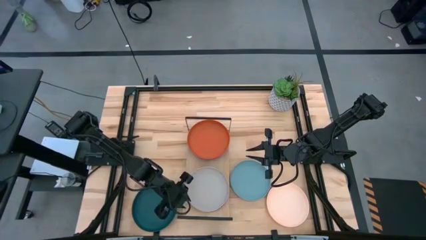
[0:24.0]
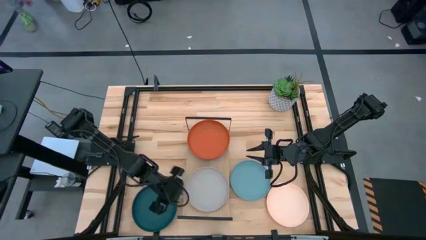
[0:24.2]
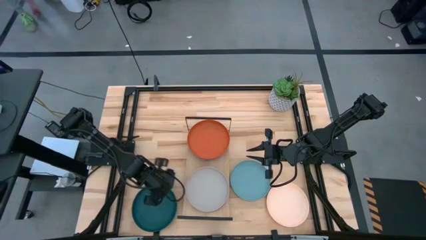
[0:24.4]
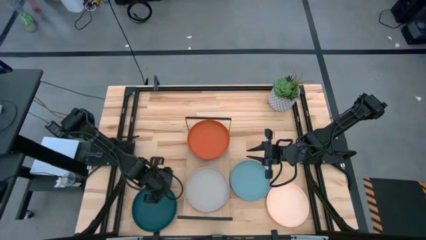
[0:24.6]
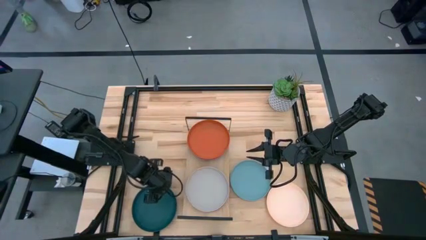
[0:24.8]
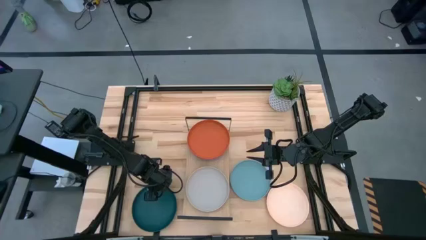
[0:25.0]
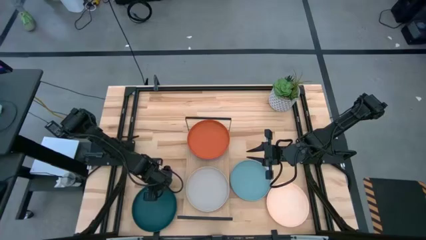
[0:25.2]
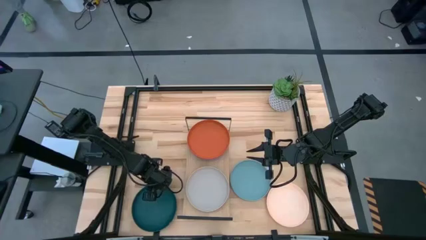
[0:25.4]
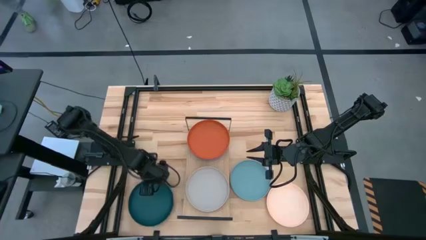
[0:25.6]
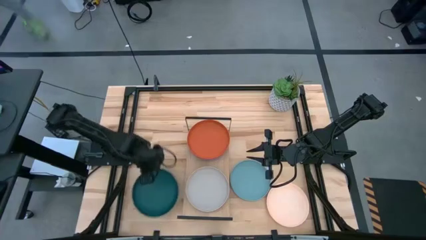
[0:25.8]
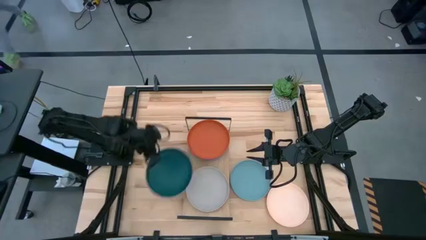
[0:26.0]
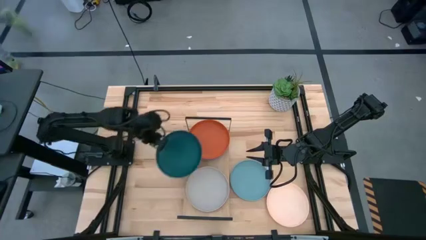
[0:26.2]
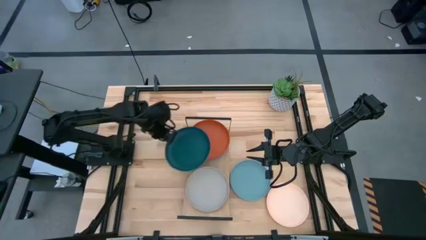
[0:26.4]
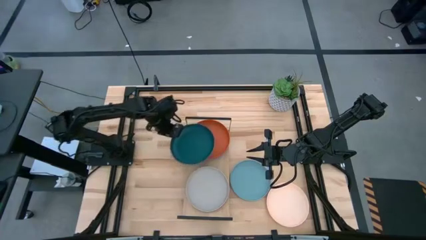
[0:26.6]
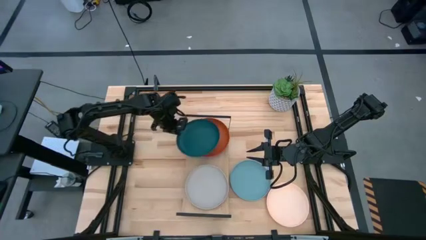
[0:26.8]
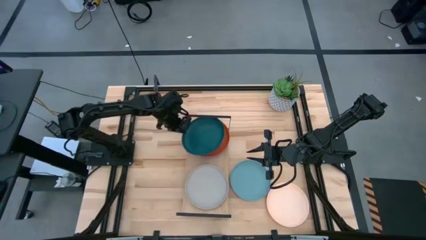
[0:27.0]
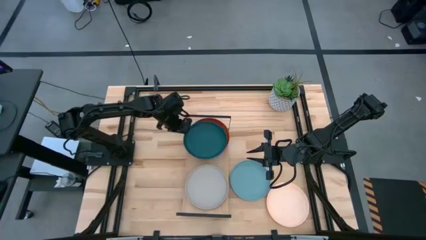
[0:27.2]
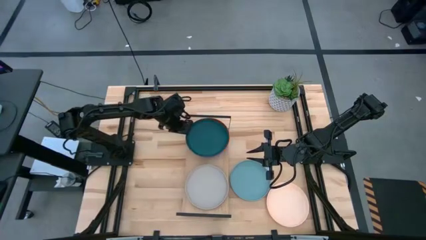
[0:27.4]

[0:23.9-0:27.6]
Task: Place and stack plates onto a shelf
Stack the dark green plate on top of the orange plate on the shelf

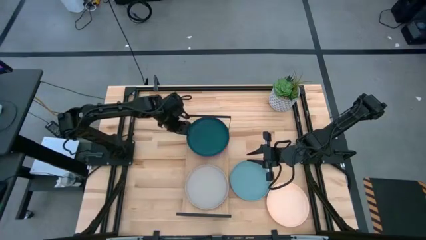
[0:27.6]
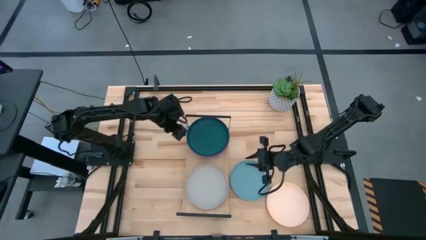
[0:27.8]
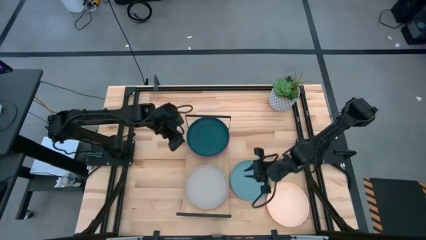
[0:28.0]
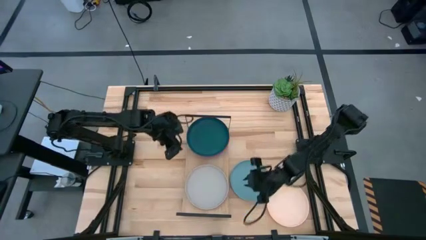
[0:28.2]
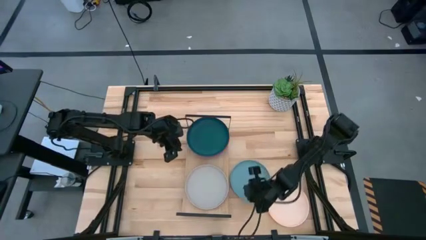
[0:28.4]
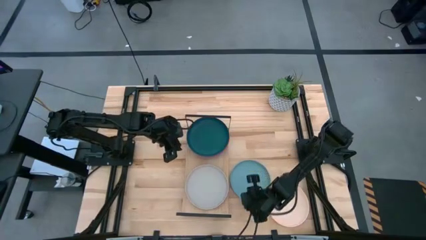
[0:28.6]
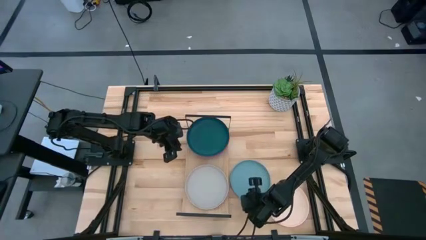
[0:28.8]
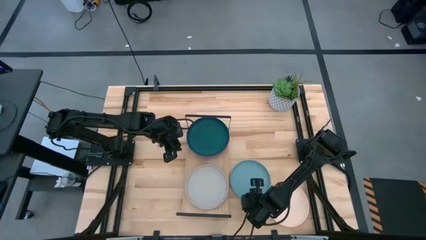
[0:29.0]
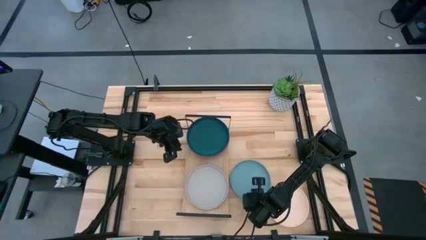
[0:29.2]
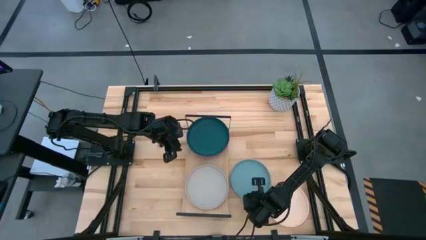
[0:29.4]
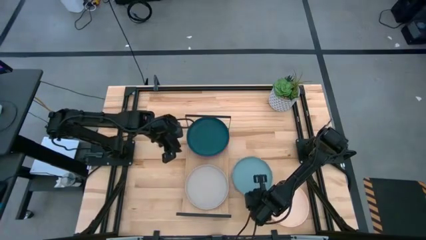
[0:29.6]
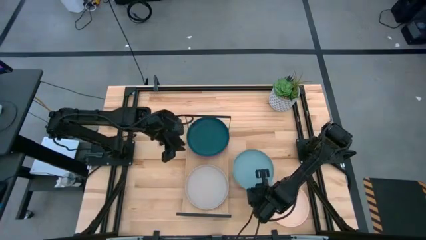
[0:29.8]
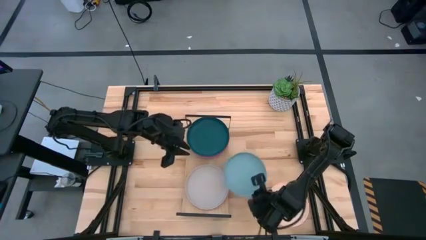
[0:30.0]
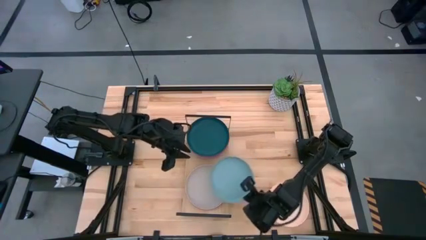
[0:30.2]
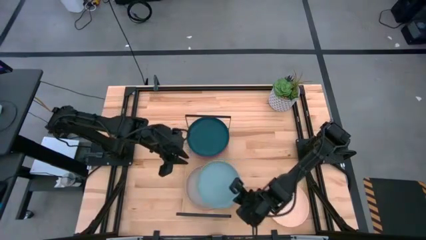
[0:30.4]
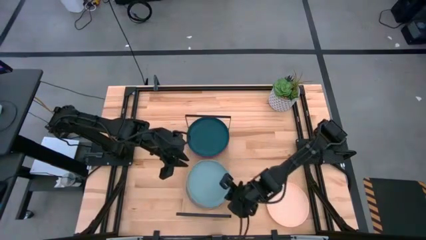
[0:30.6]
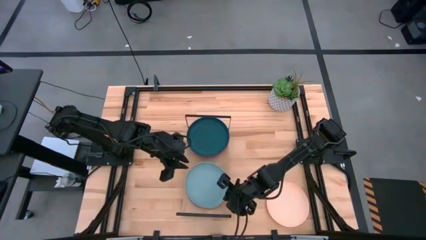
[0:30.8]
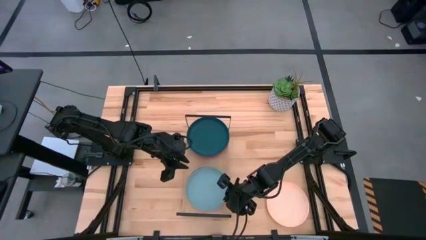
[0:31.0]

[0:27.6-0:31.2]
Stack the light green plate on top of the white plate on the shelf

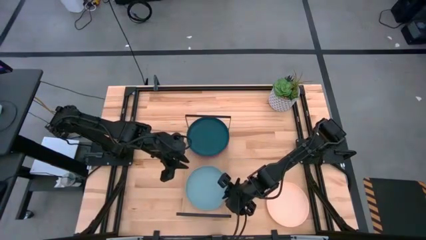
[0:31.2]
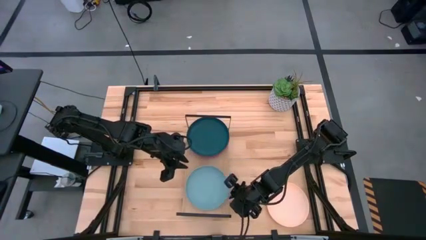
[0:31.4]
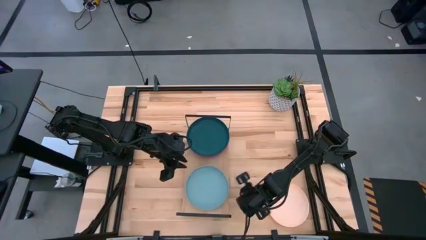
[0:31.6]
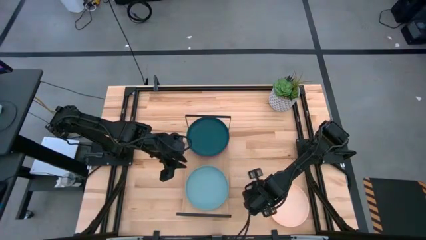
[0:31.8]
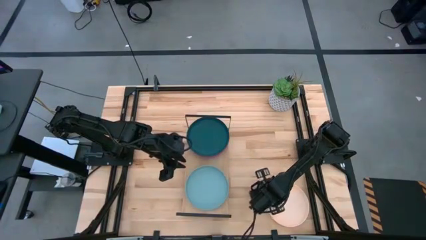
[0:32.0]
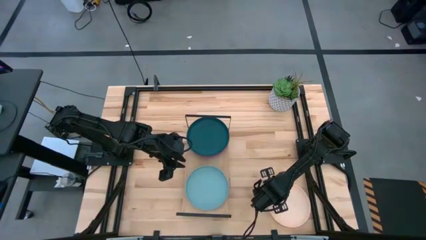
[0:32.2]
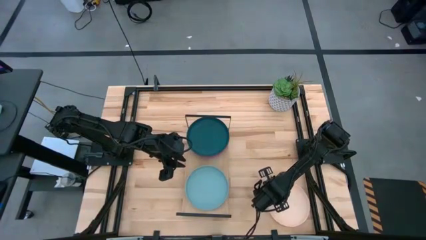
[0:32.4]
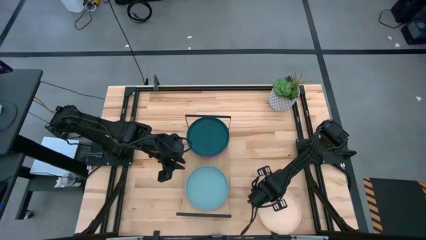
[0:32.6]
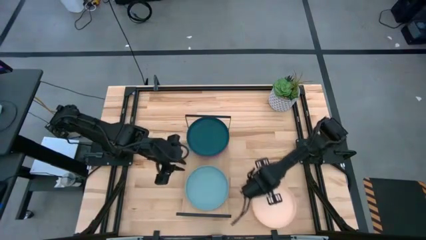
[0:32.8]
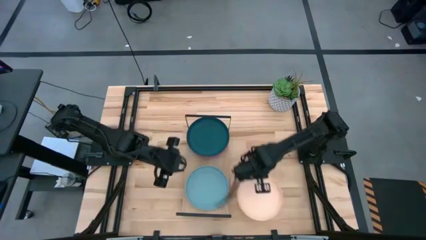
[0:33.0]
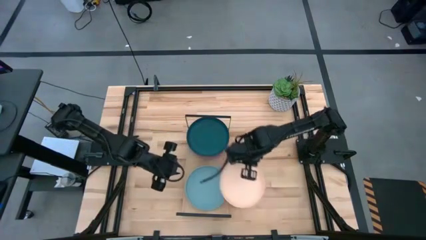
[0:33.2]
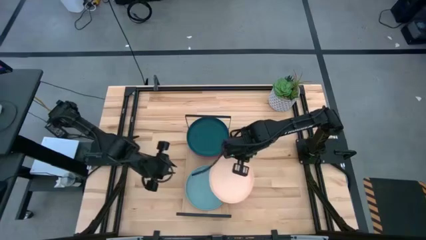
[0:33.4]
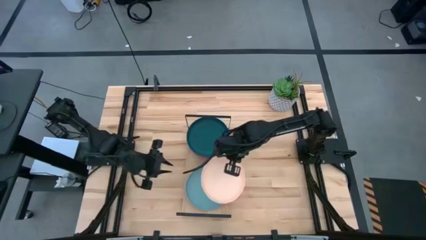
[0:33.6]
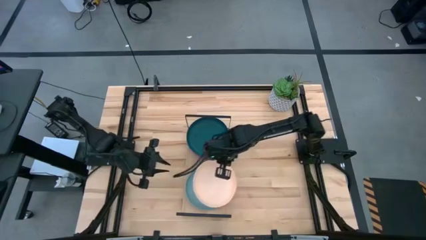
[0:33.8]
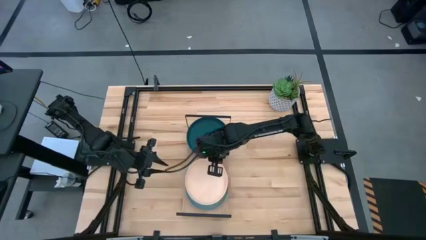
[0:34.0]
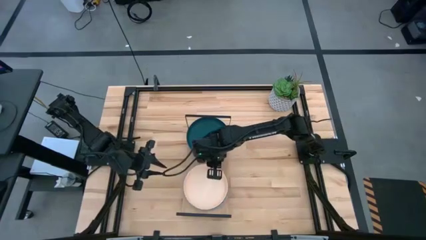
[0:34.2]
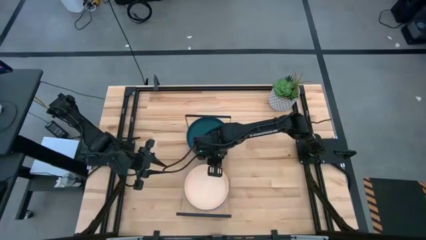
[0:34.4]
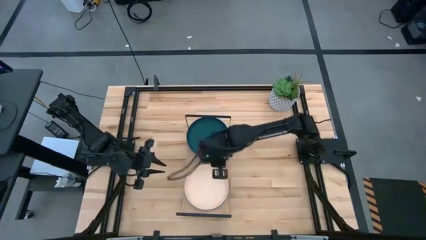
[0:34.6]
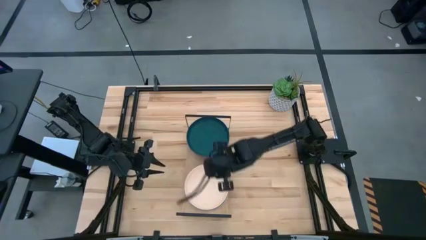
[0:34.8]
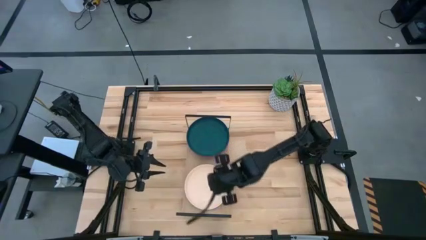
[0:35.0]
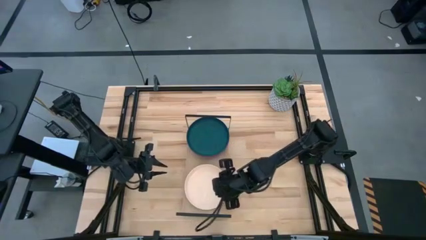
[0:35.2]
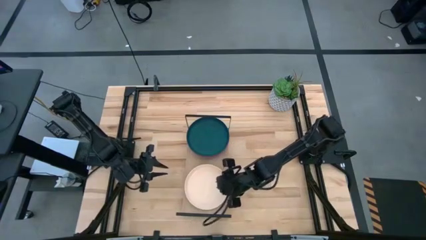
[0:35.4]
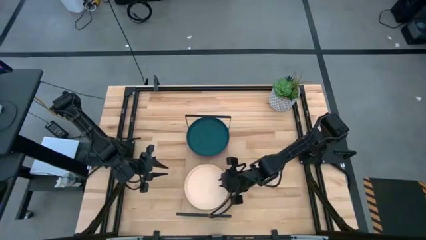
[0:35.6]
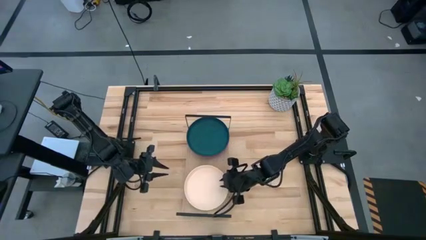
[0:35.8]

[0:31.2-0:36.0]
Stack the white plate on top of the light green plate on the shelf

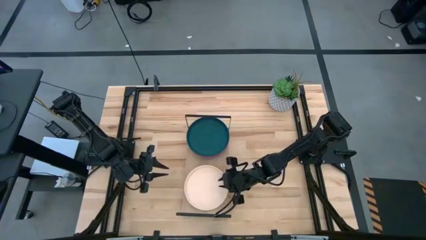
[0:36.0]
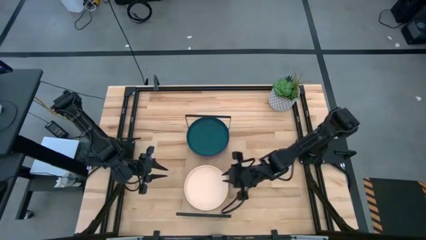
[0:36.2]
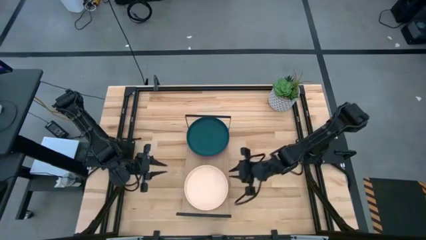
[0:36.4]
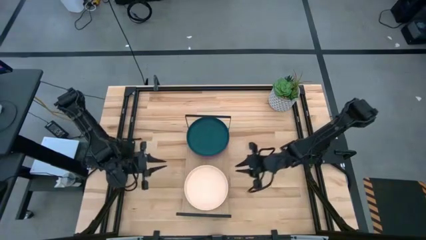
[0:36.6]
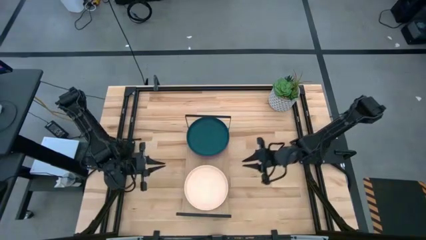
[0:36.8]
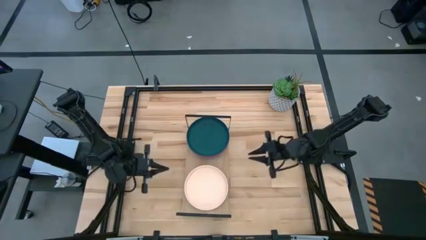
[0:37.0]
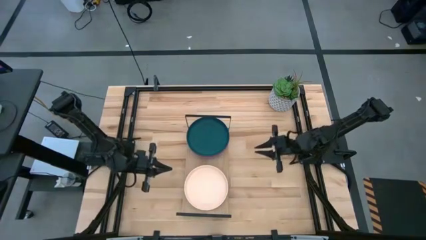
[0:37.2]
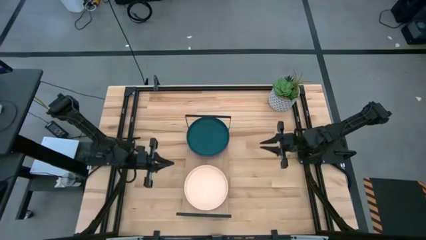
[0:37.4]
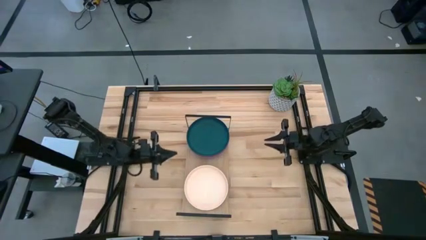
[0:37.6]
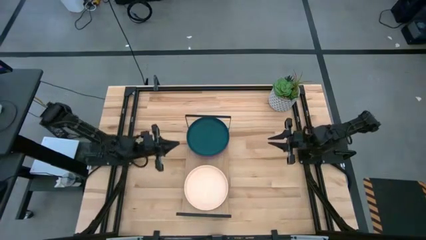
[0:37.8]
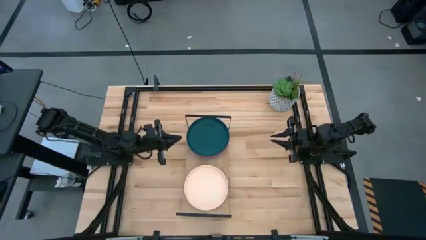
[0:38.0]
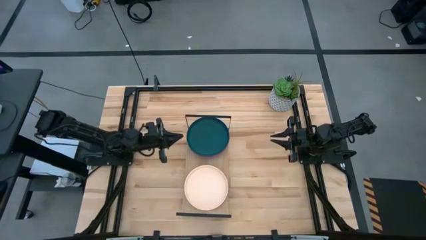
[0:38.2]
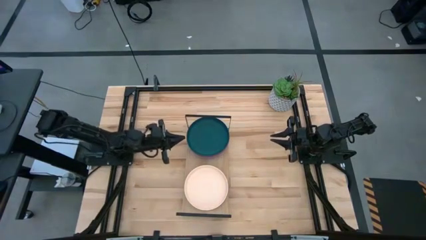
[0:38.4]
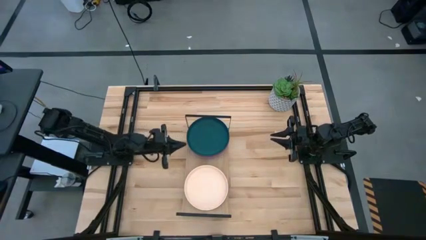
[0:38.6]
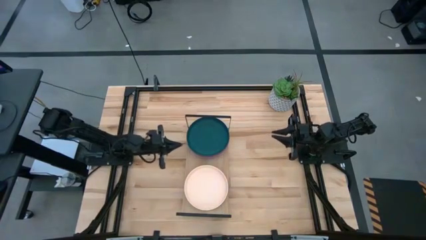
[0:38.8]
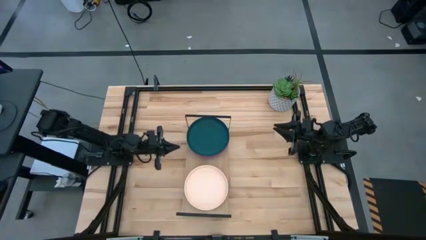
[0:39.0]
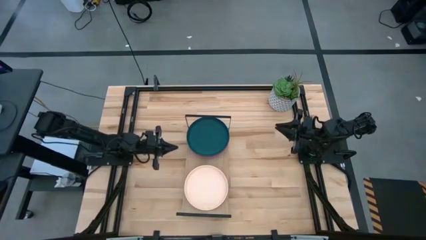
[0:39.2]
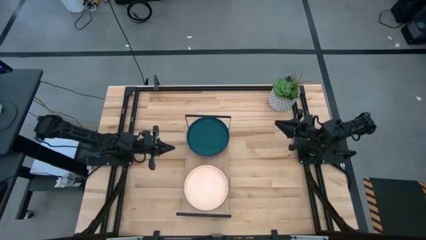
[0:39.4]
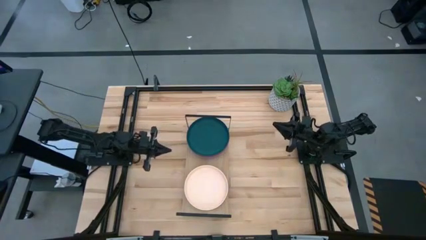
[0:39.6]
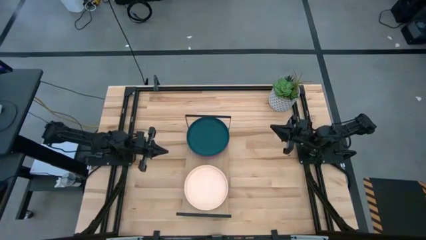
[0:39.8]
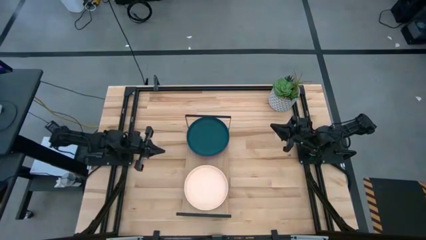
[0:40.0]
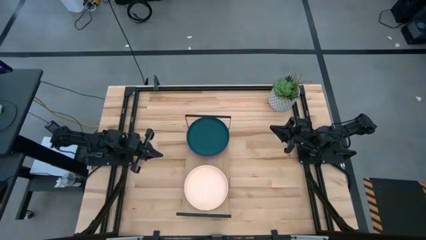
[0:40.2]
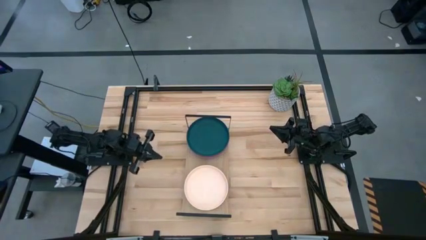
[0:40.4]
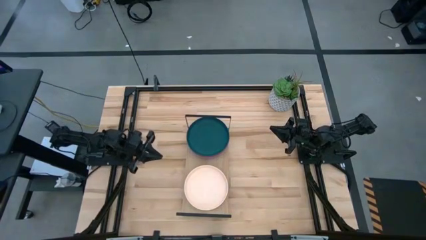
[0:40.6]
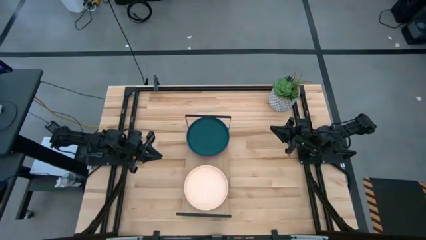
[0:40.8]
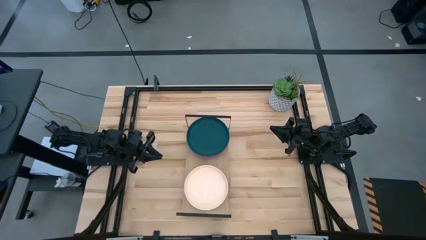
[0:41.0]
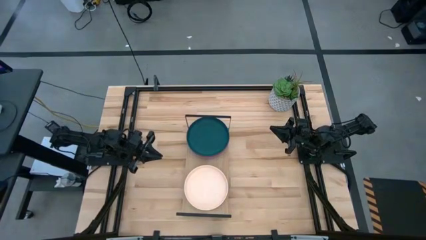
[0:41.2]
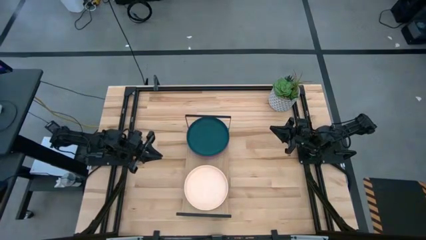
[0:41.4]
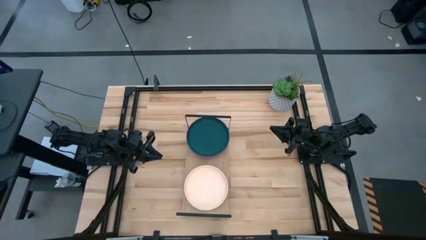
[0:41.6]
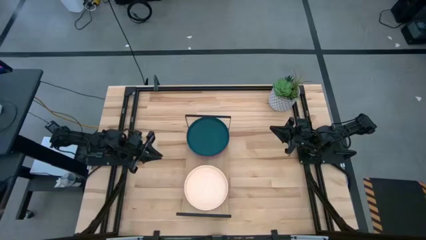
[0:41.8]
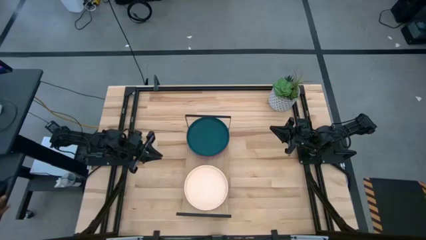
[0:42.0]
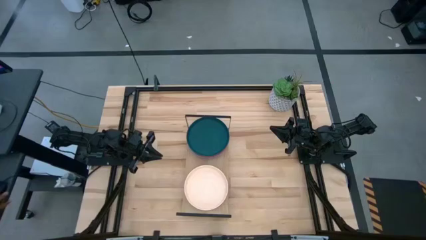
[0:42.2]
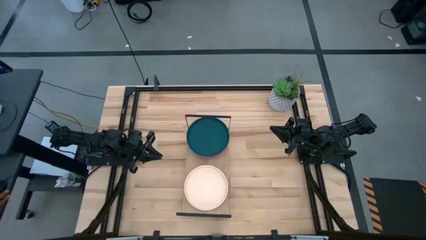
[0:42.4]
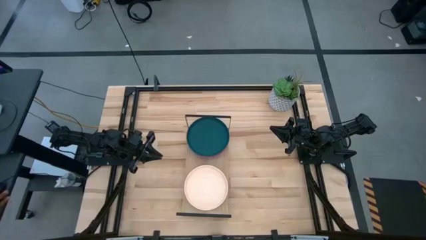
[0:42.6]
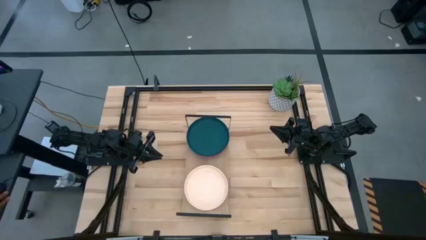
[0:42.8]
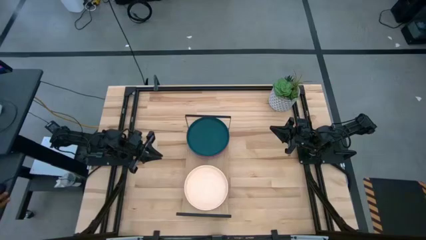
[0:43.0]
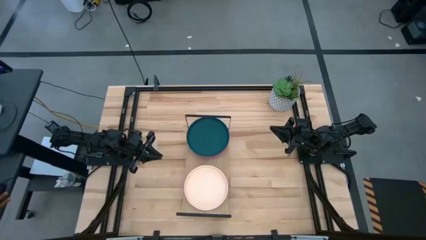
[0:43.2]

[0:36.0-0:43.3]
Return to Home Position
